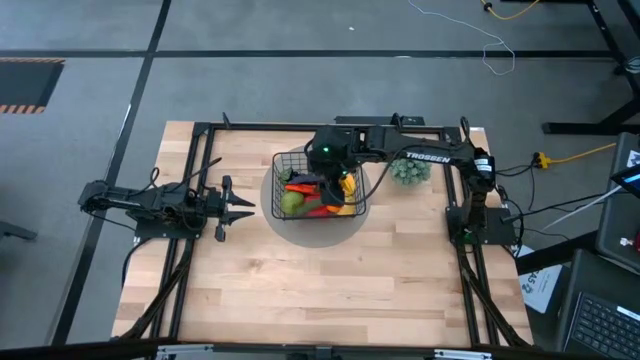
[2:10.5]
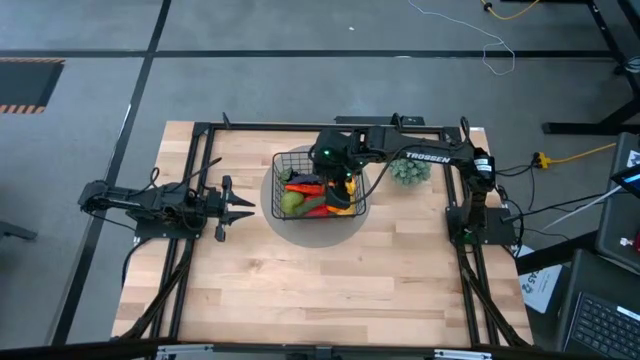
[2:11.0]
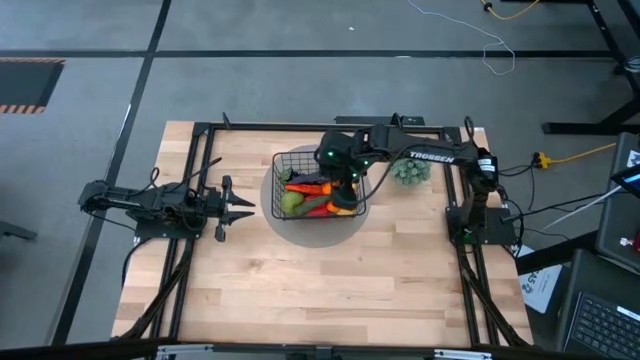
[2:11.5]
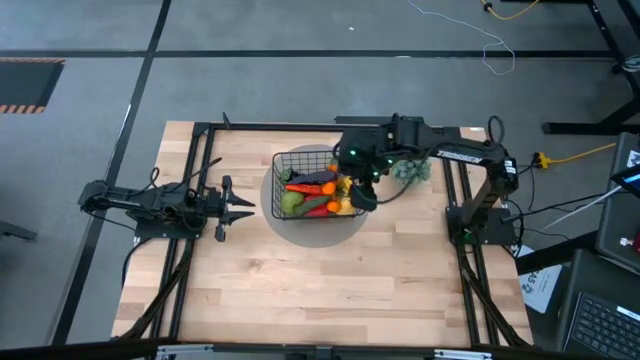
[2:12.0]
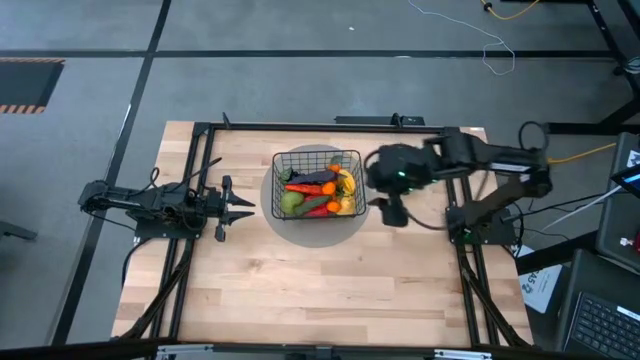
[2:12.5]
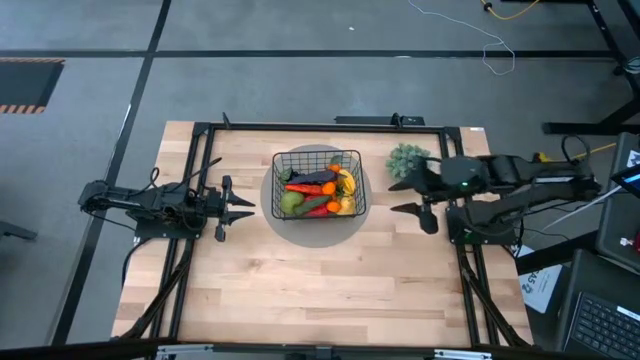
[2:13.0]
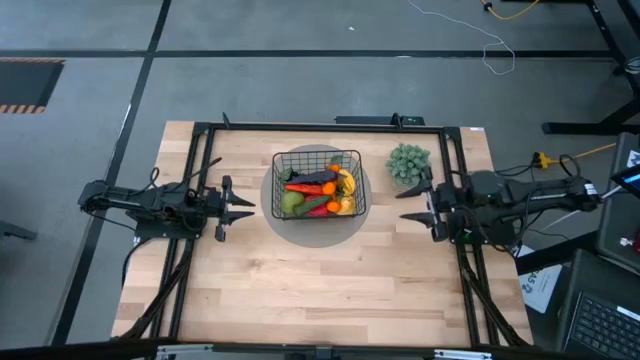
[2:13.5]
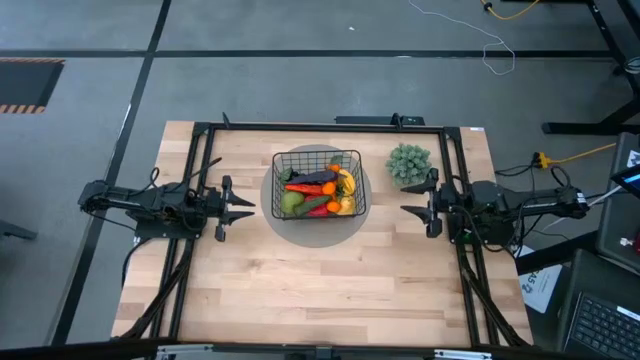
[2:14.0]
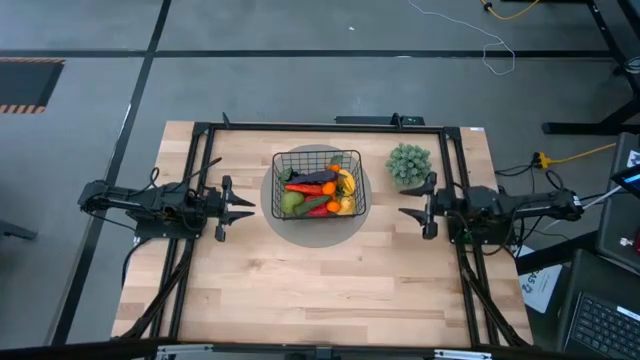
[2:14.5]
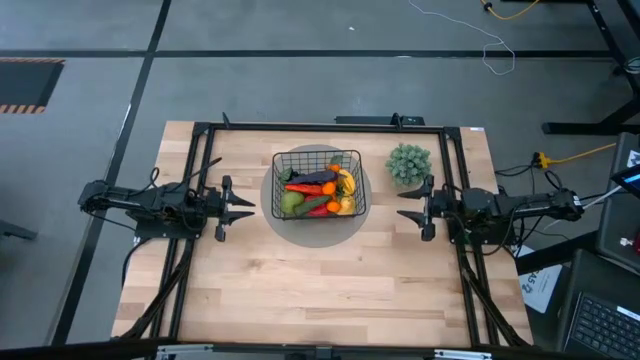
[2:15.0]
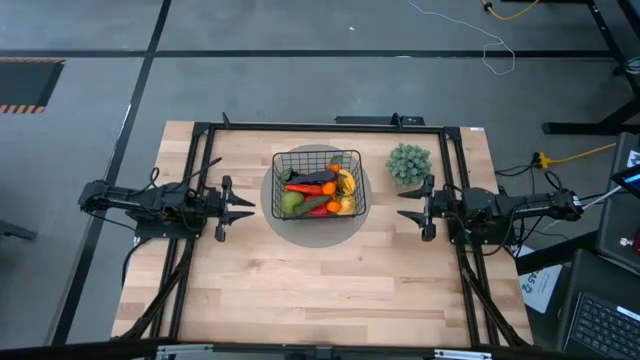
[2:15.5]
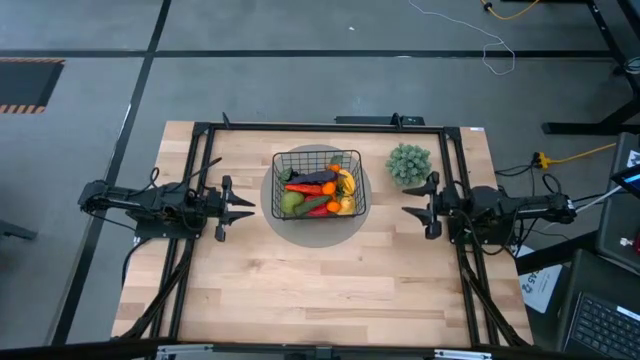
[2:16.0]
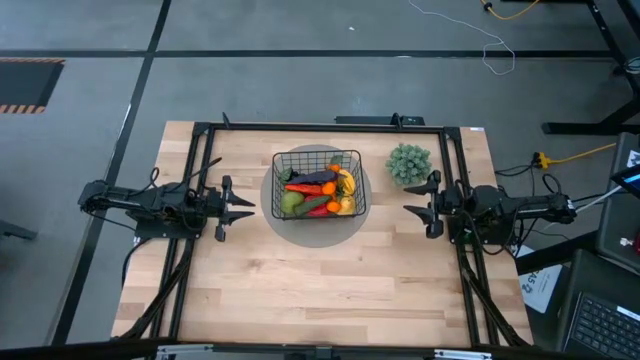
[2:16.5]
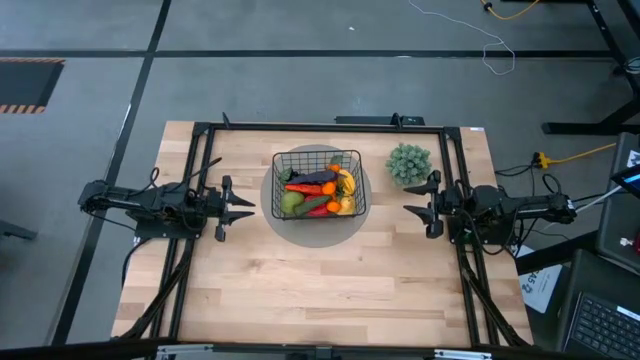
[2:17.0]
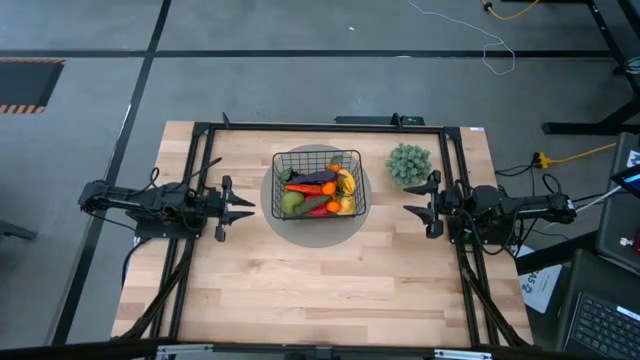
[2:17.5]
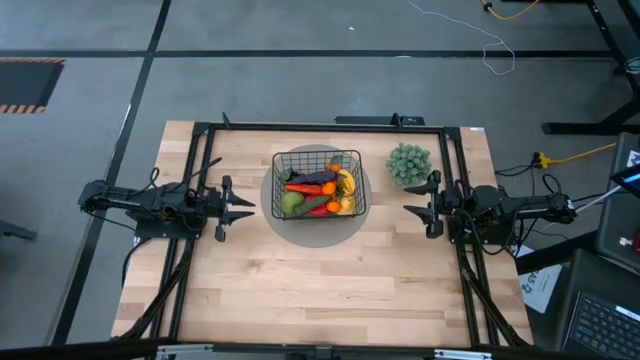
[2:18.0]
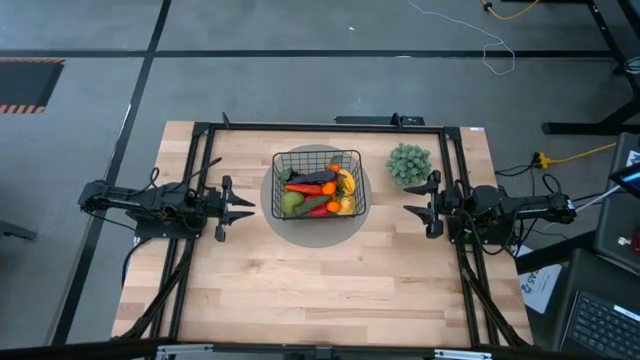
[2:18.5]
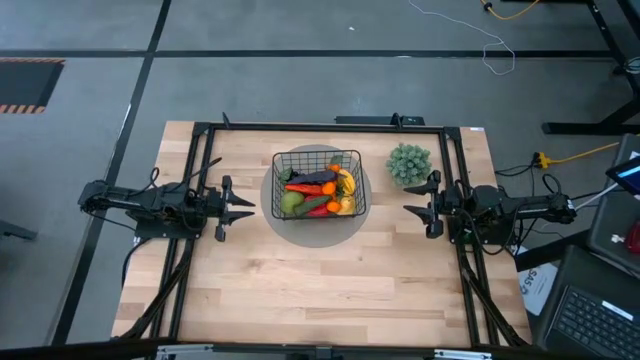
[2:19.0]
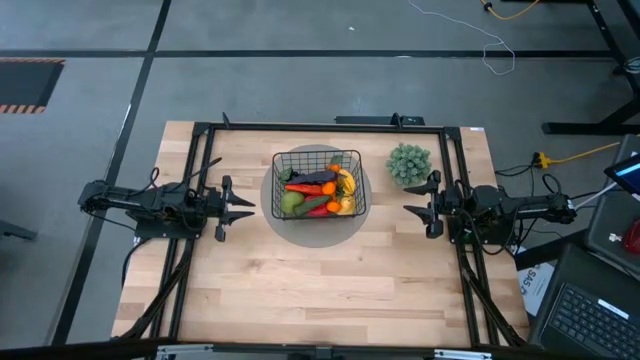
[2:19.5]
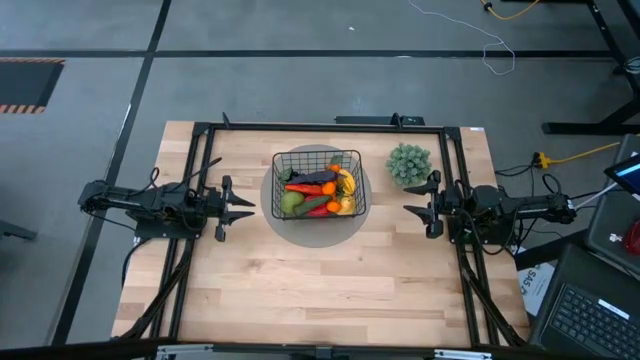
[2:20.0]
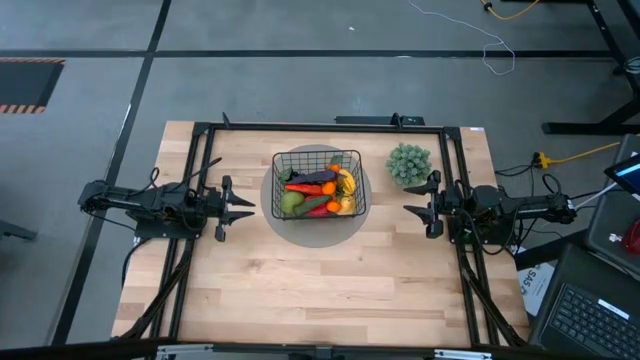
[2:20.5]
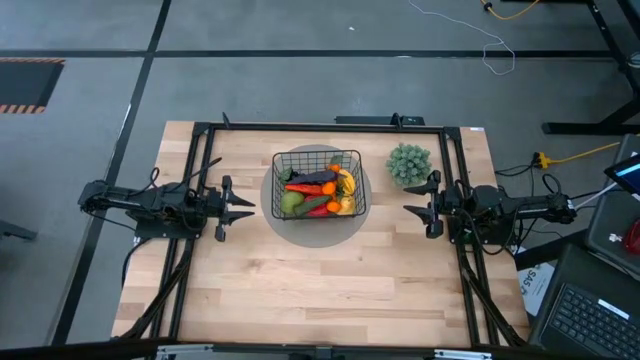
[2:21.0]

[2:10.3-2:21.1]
Task: Build produce basket
Return to Home Position

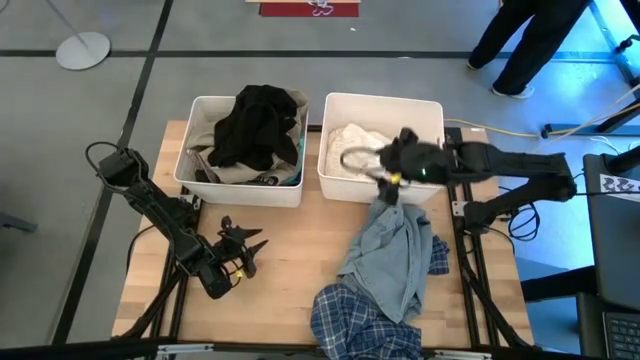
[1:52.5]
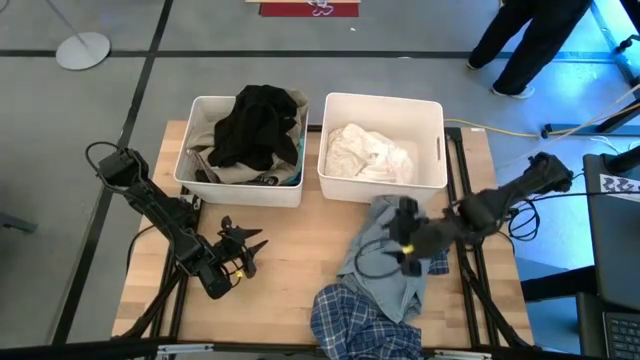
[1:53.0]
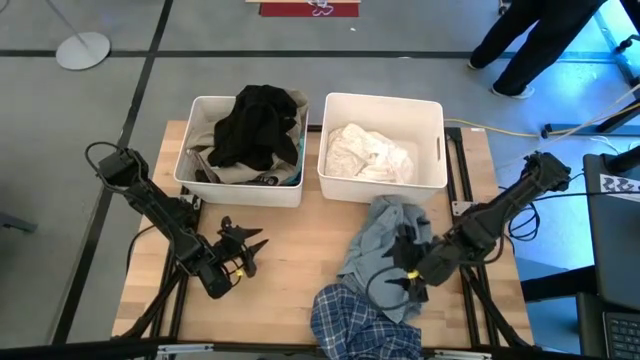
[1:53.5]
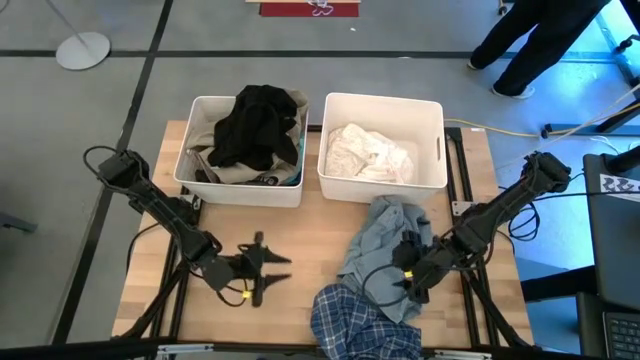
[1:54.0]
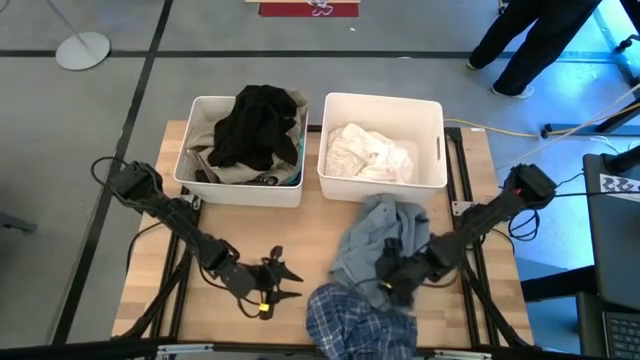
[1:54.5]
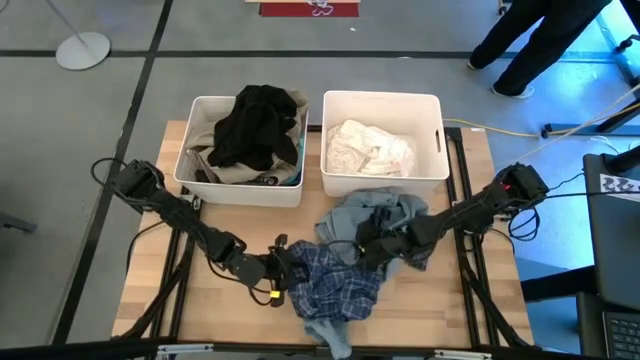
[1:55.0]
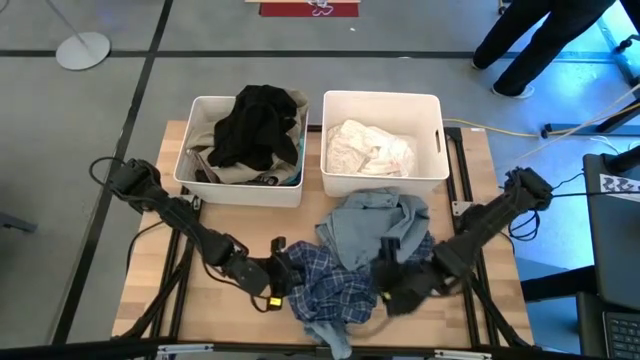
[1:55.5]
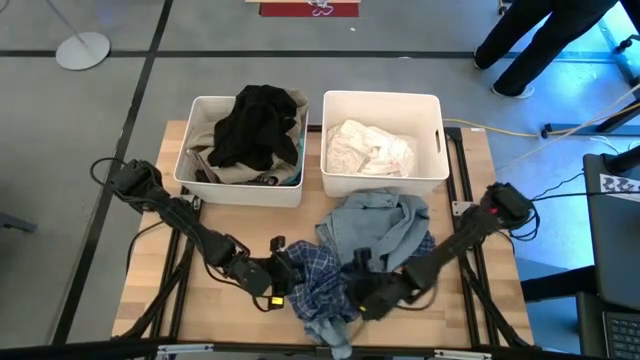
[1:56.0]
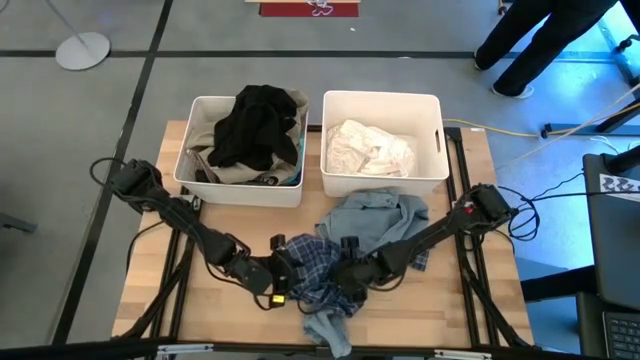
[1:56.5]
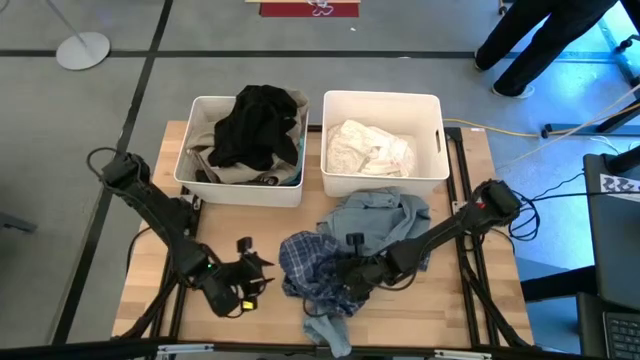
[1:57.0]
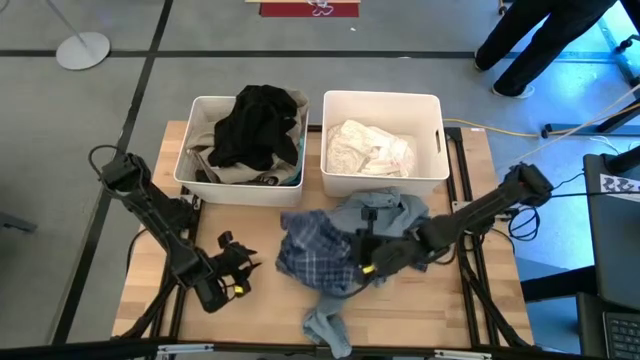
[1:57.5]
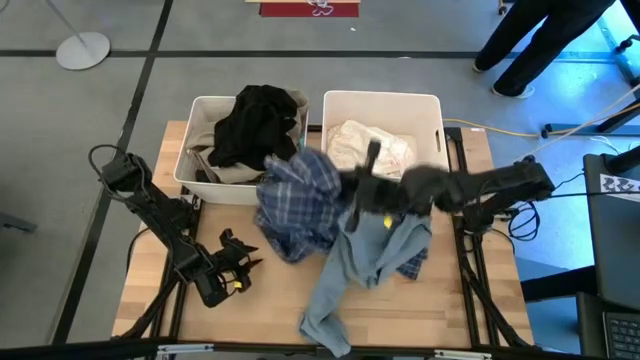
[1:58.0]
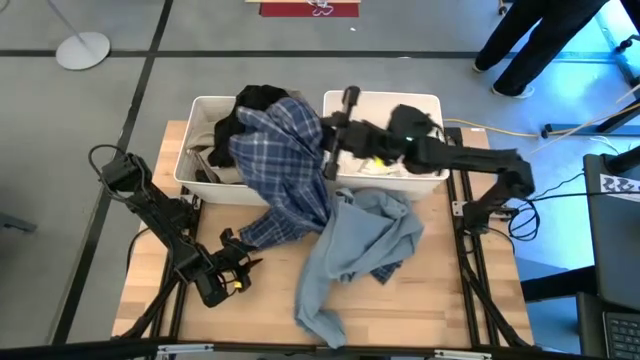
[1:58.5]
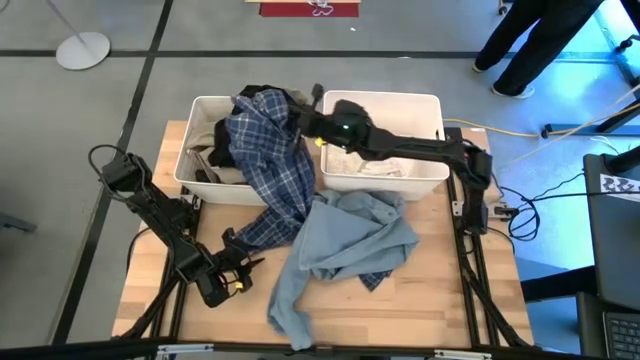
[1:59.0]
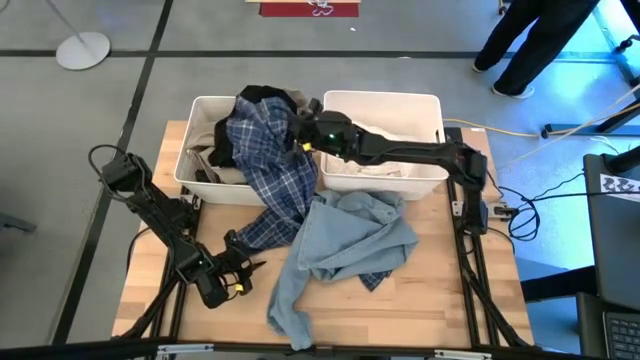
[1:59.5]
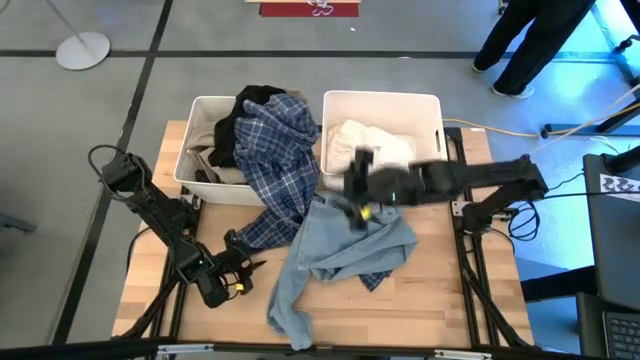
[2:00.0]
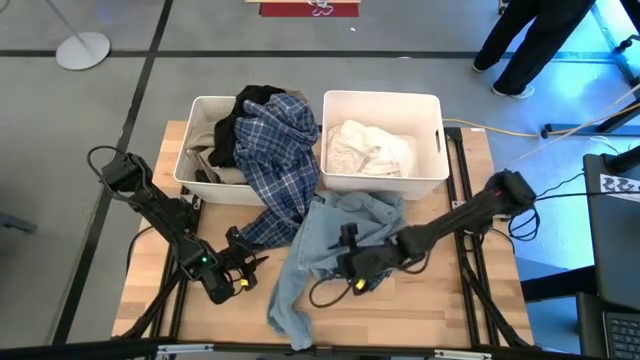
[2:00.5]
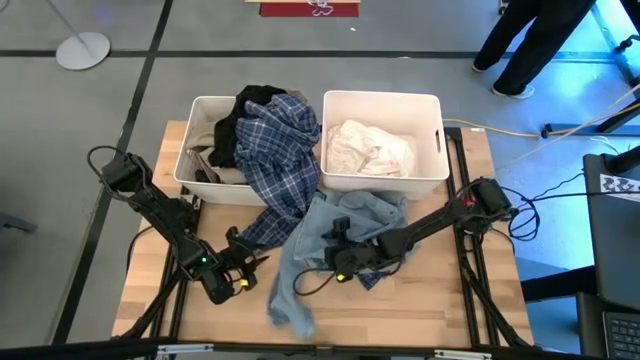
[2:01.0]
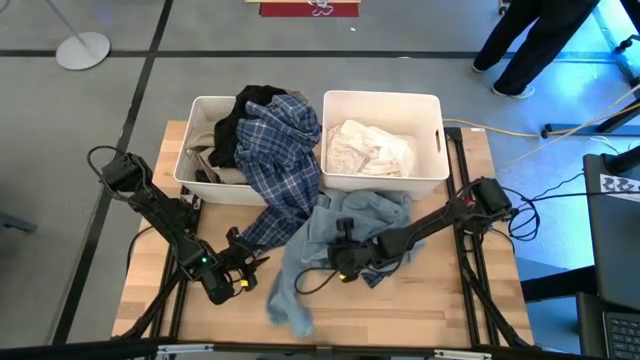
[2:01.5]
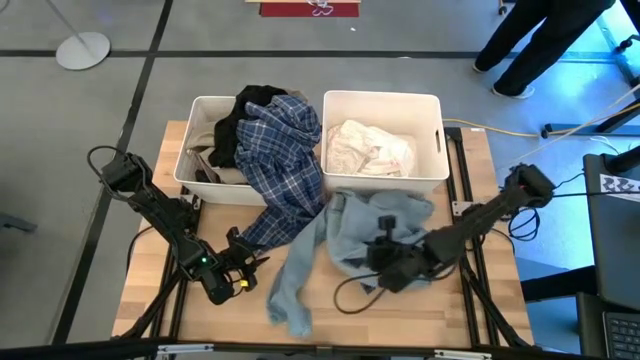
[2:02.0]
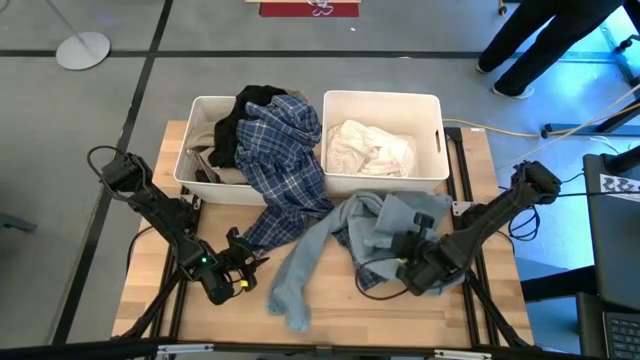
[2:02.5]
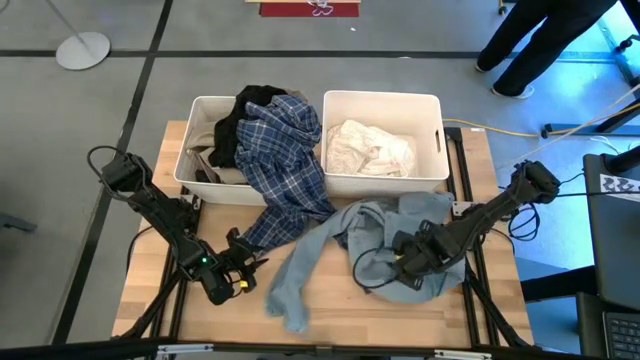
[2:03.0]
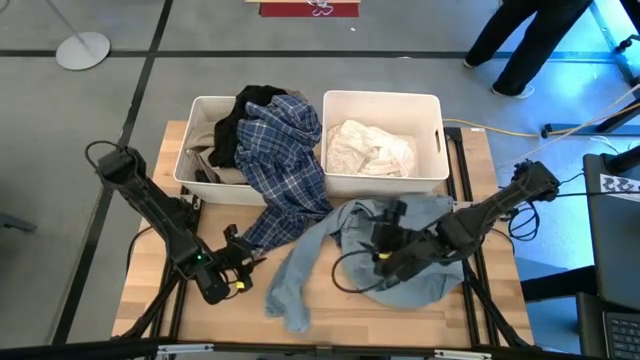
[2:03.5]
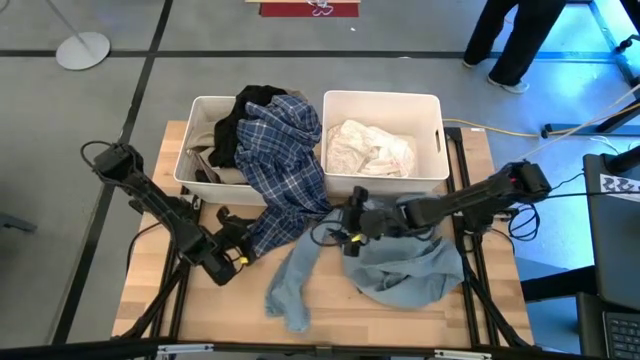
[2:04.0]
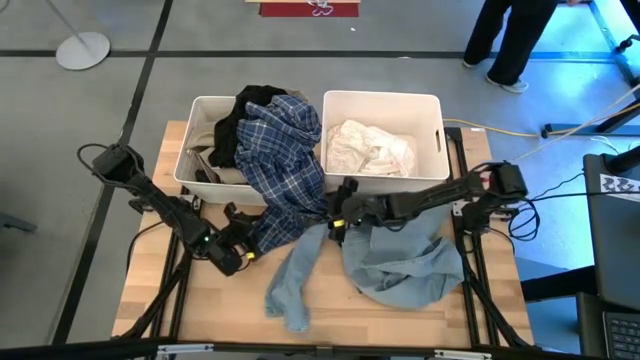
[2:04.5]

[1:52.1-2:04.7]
Task: Sort clothes
Put the blue checkered shirt into the left white bin
